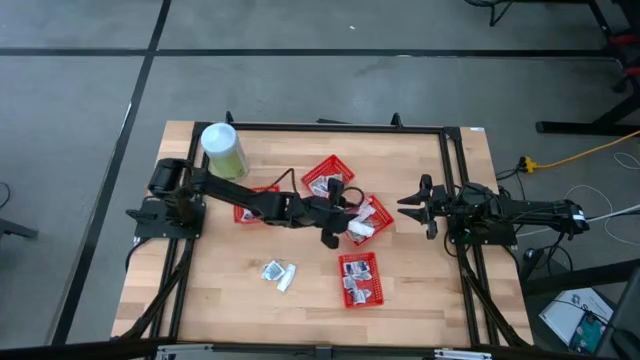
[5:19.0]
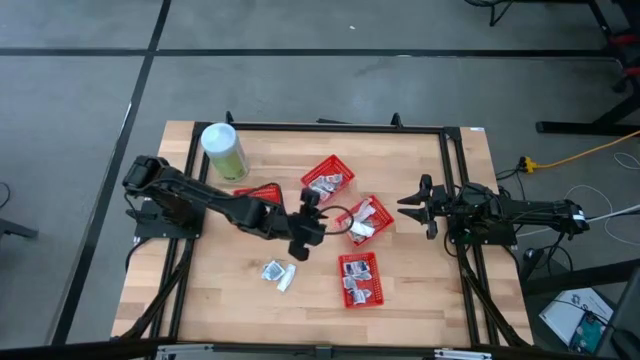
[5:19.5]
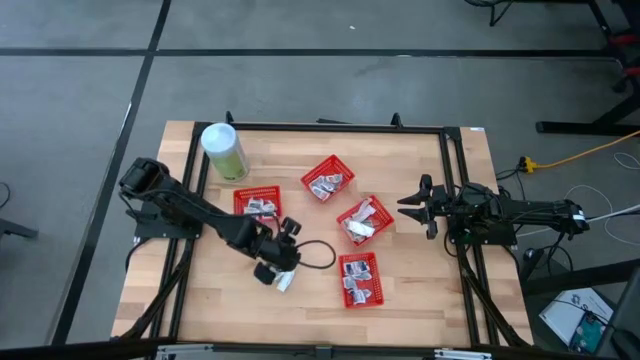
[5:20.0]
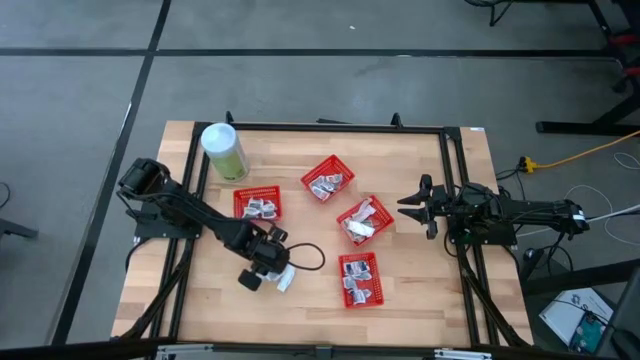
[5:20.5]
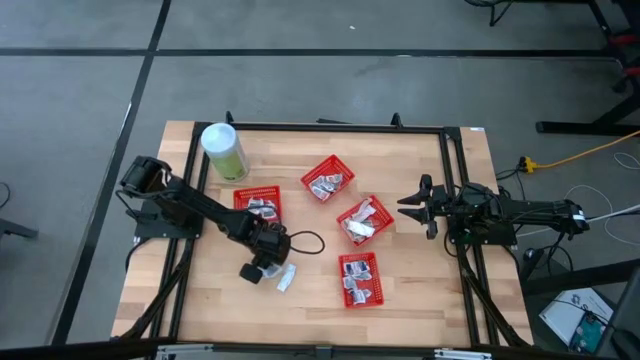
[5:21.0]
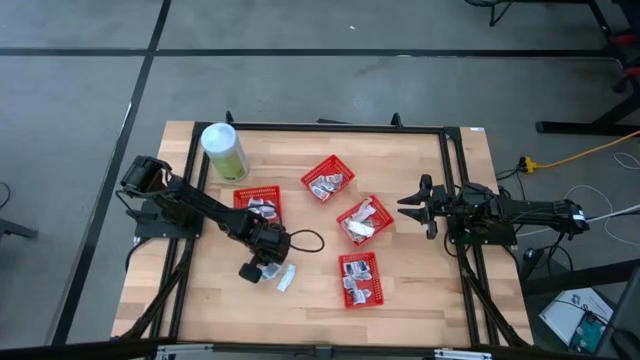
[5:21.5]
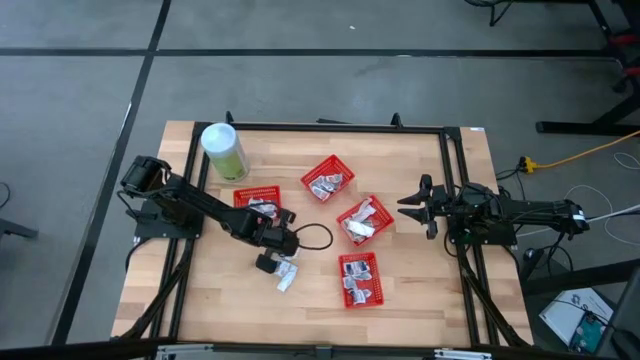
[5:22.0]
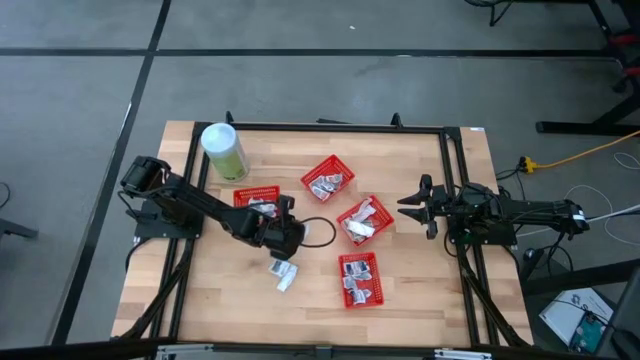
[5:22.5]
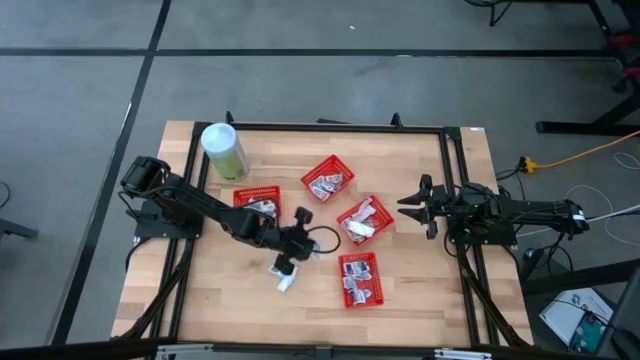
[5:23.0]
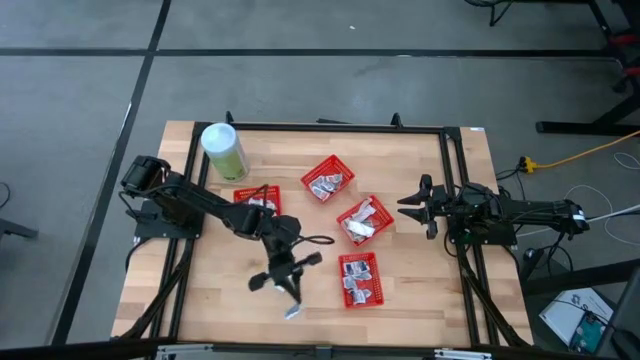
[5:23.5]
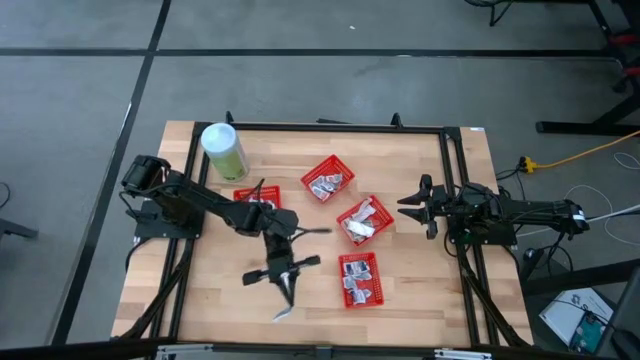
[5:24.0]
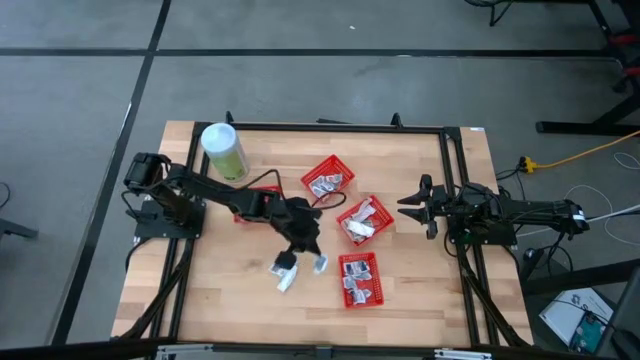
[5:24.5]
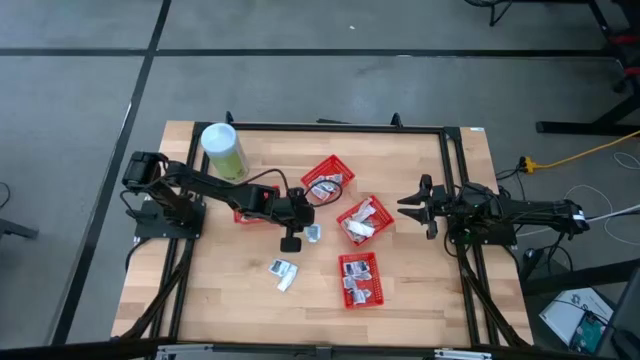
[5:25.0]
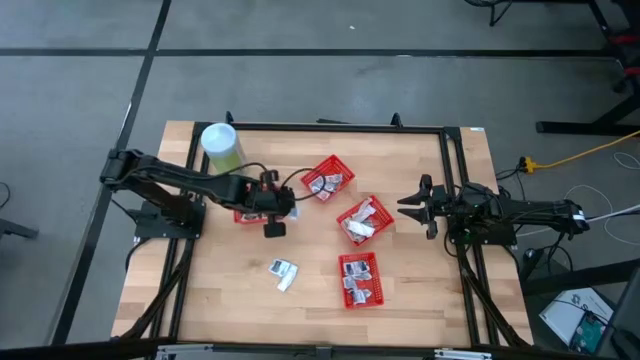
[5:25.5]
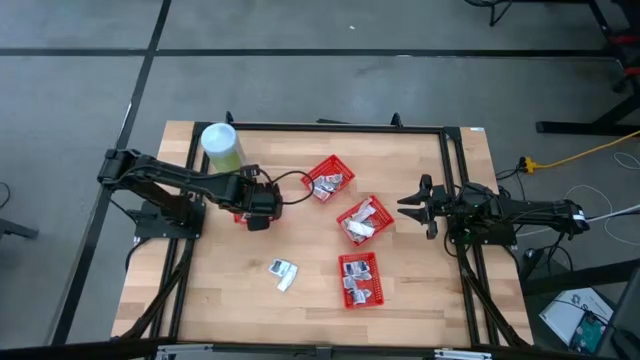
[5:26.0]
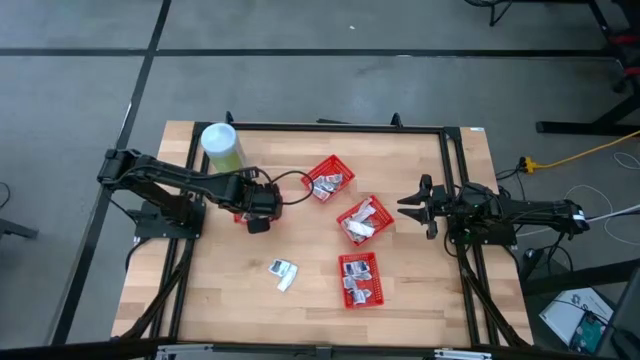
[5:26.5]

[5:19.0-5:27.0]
Task: Pick & Place First Aid Supplies
Put the gray towelette pack into the red container

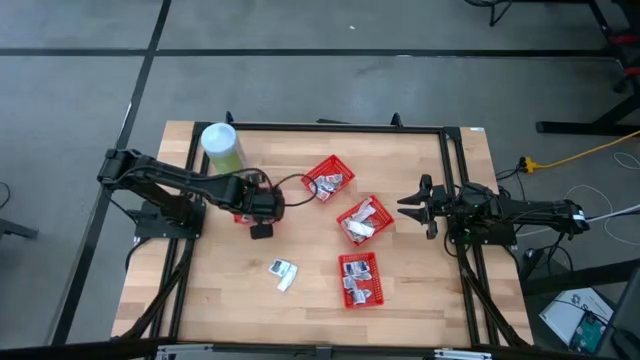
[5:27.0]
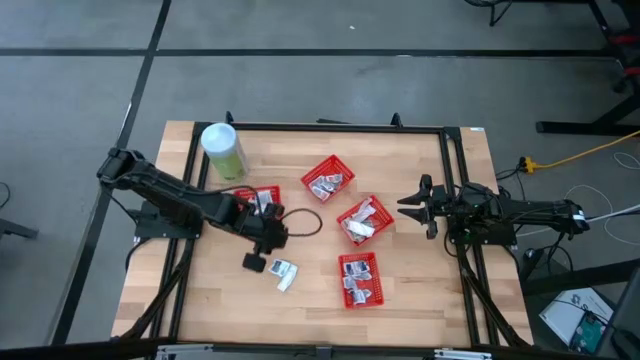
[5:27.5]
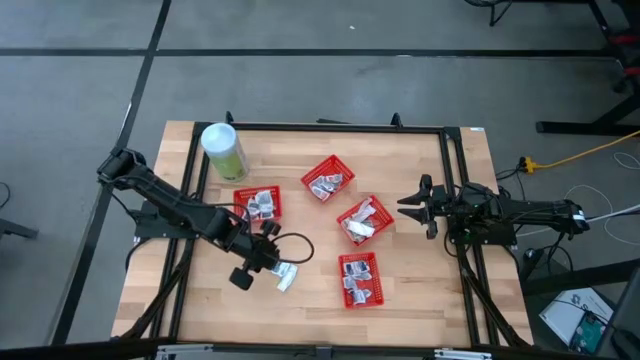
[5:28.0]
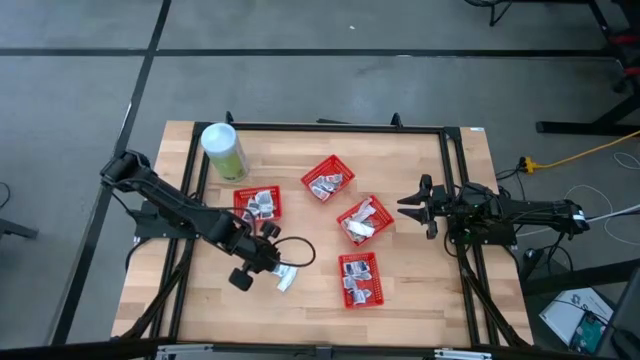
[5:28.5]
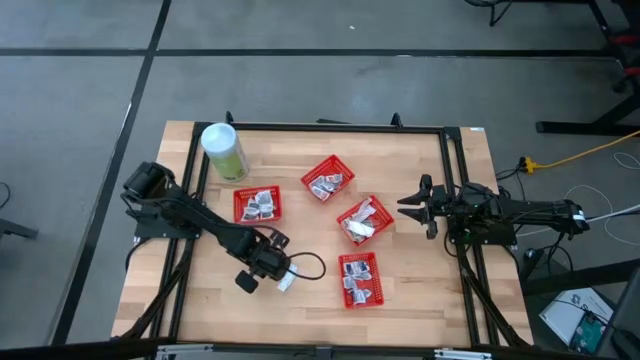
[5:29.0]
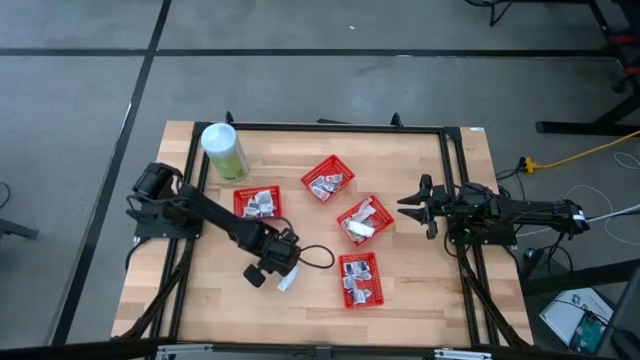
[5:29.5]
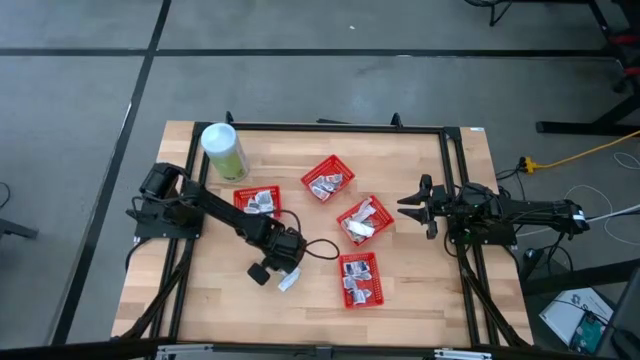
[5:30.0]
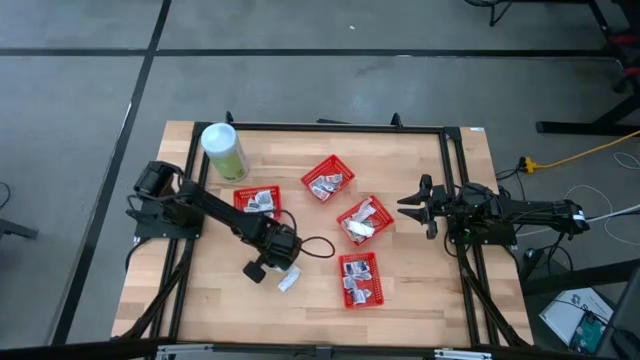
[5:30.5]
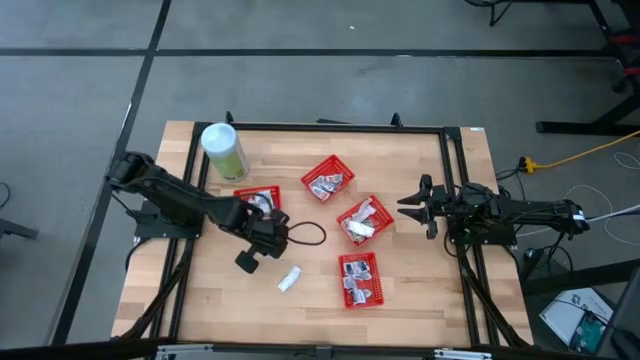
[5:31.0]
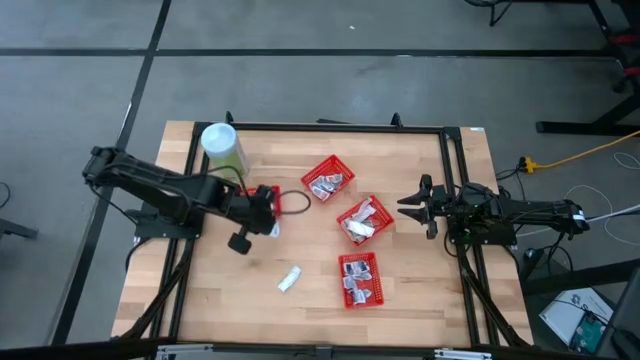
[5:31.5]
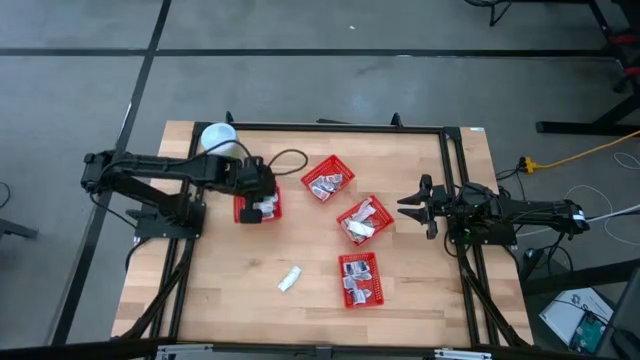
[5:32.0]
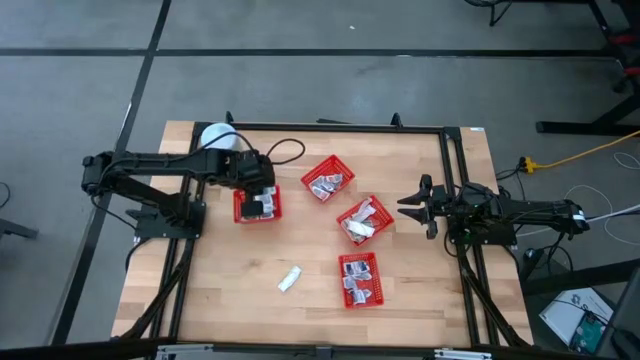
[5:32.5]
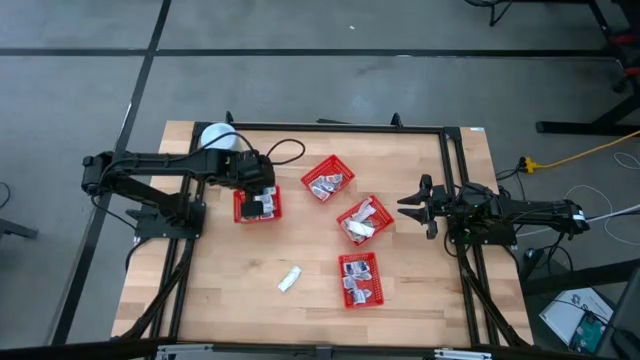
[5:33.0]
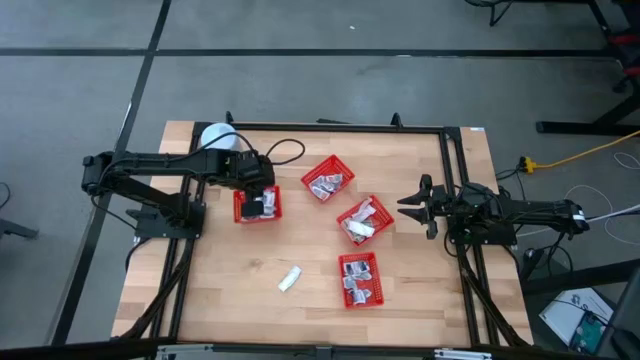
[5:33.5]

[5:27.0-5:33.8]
Put the gray towelette pack into the red container

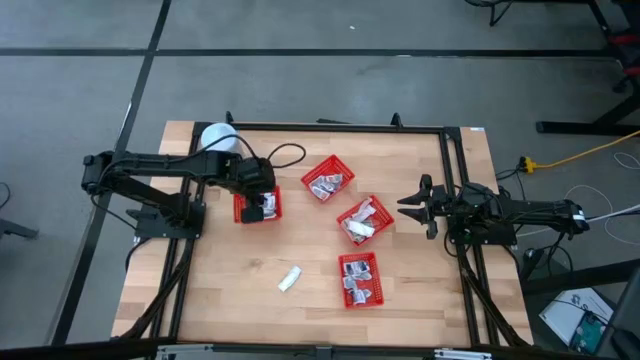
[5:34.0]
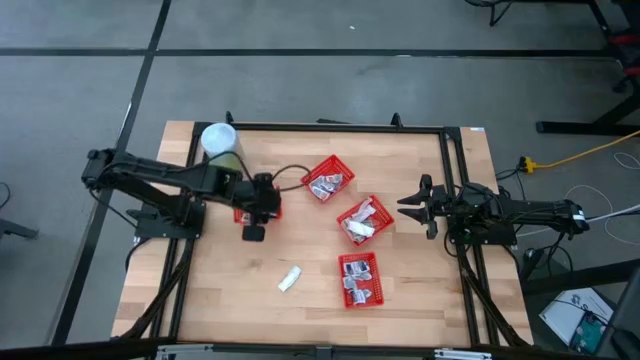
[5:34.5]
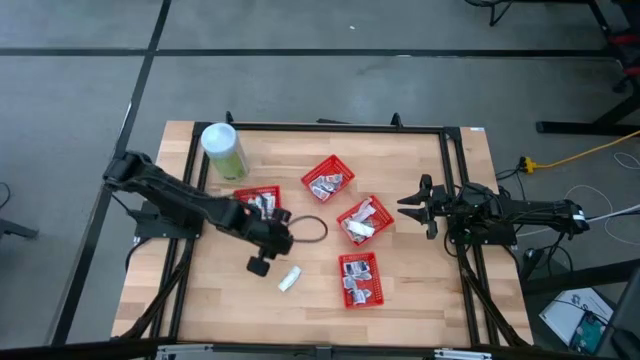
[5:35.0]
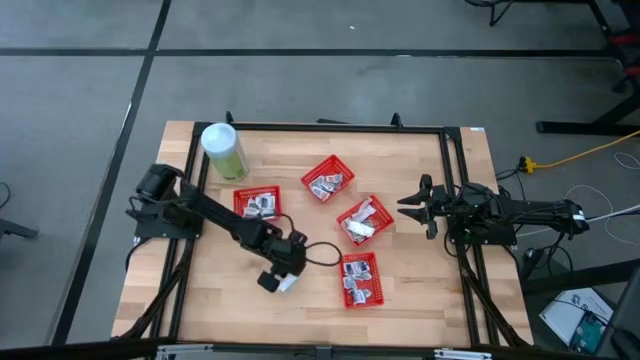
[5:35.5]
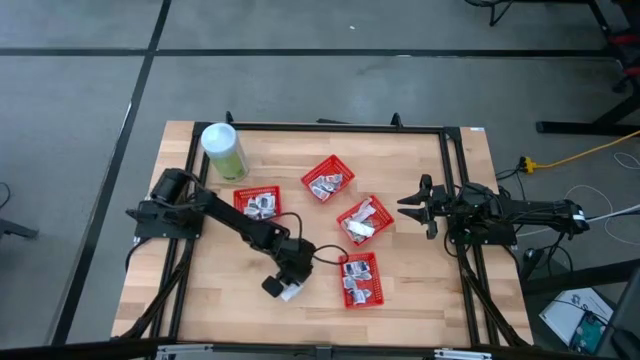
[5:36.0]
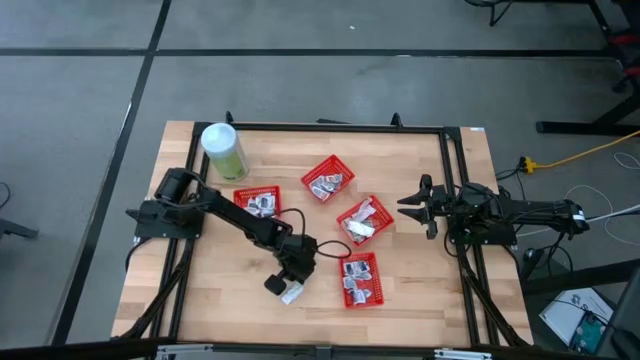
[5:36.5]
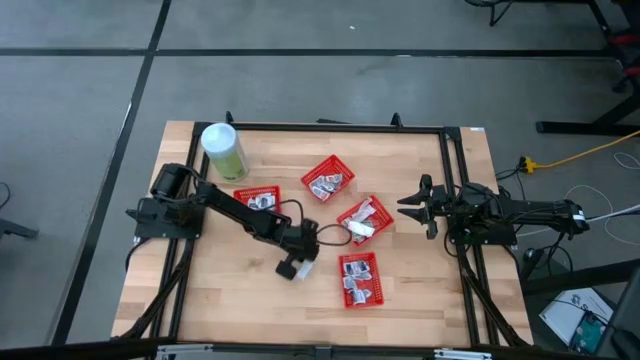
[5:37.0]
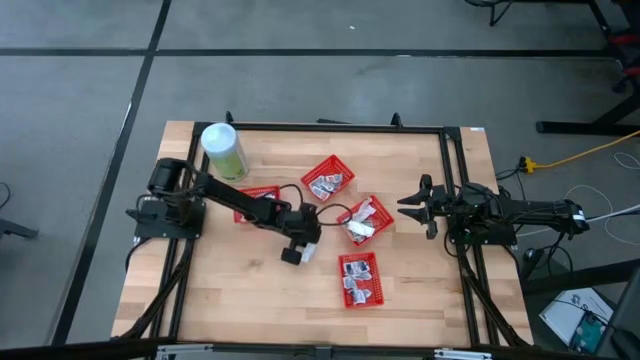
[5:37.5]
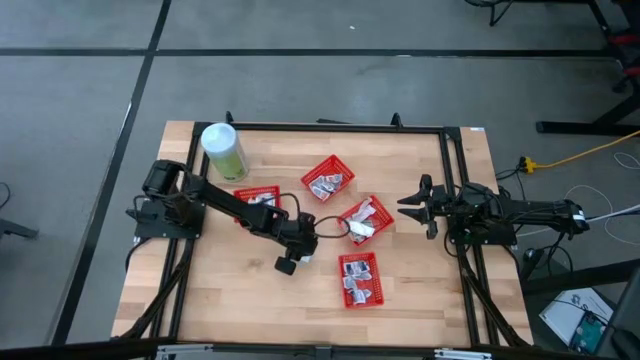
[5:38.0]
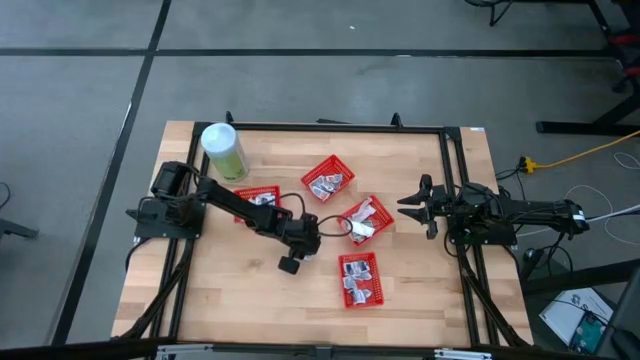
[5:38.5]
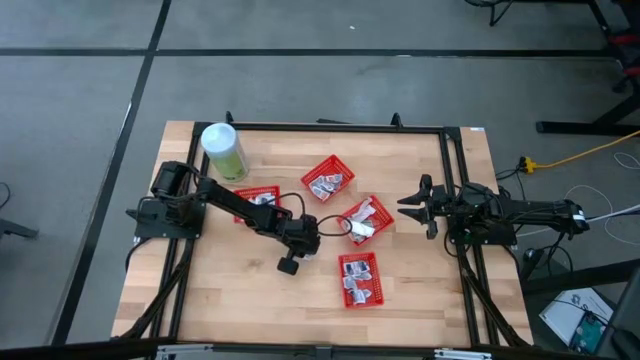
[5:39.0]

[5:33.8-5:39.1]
Put the green bandage into the red container

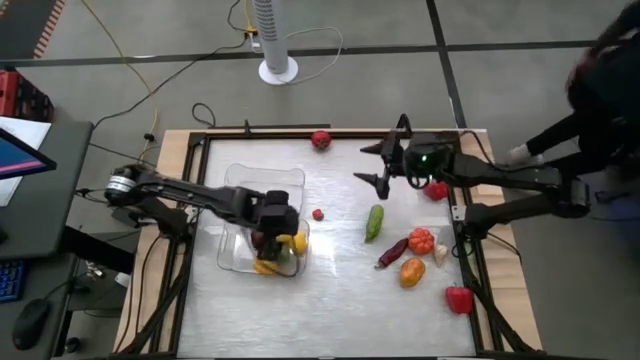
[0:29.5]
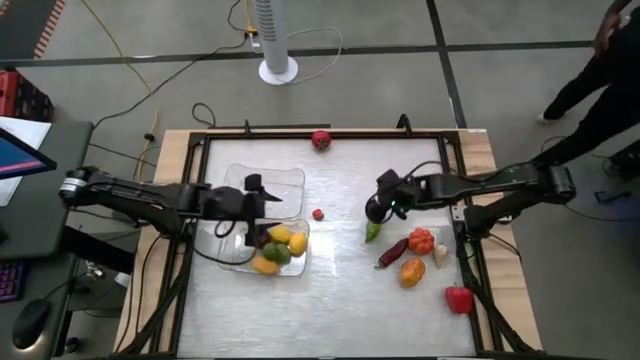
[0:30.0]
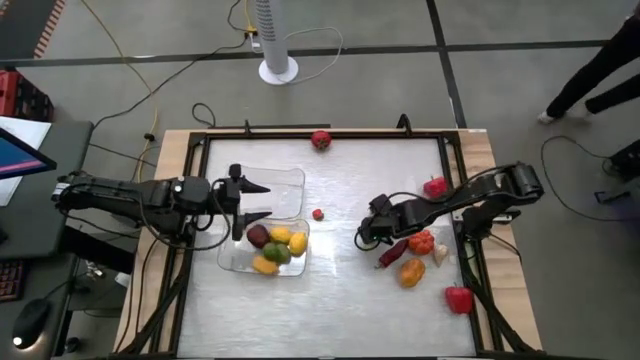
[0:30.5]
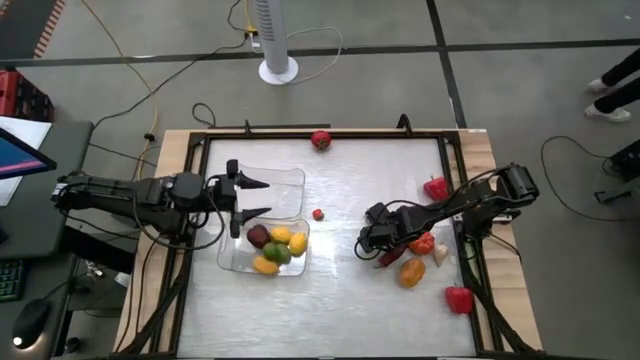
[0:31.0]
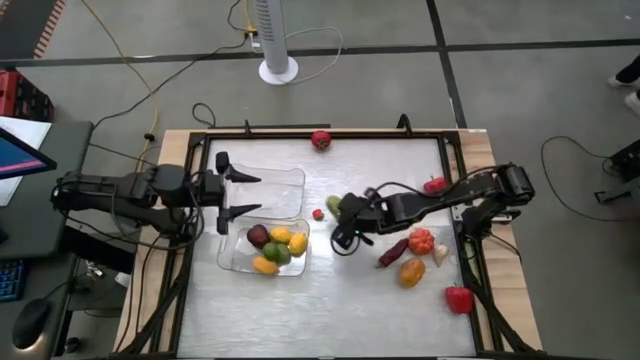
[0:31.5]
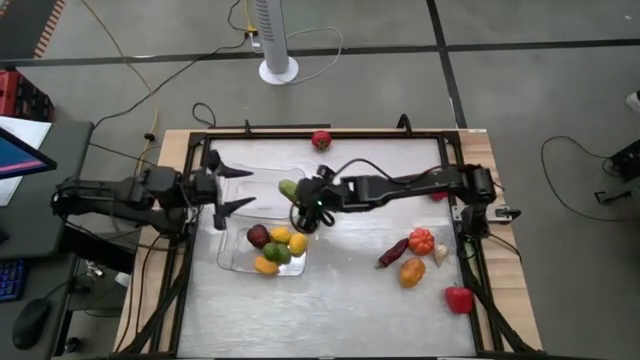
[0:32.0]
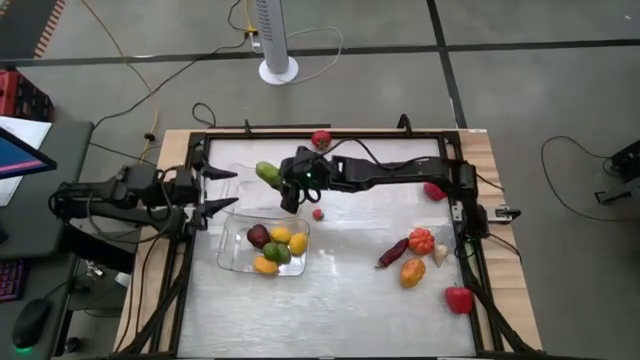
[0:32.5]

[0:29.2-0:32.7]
Task: Sort produce into baskets
Put the green cucumber into the top transparent bin
